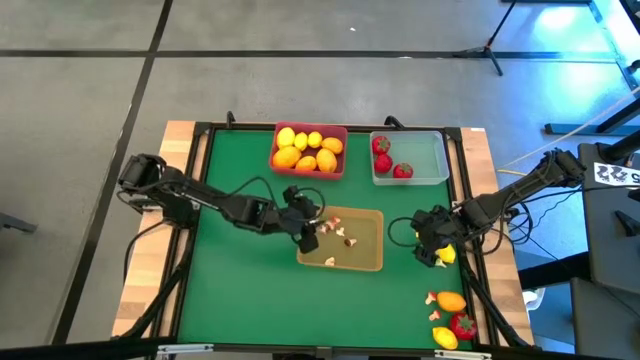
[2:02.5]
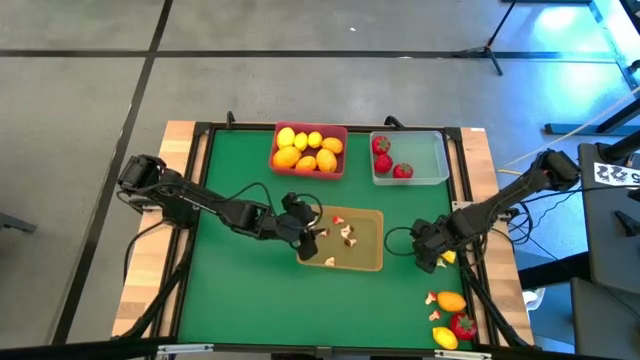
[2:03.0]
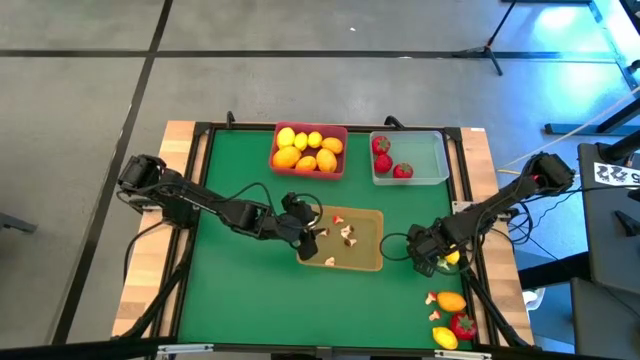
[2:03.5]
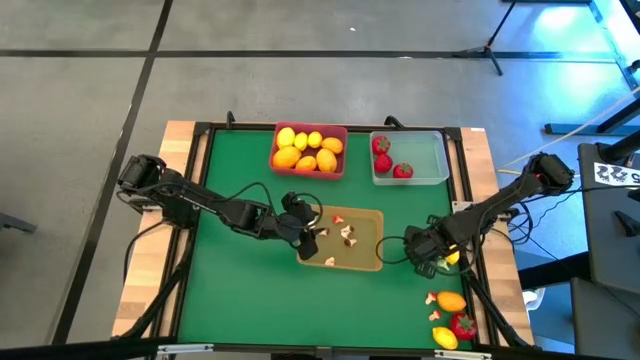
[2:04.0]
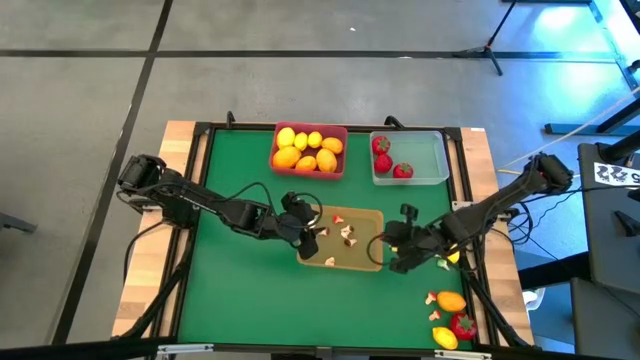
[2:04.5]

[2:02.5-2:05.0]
Task: Sort produce into baskets
Put the red mushroom into the orange bin

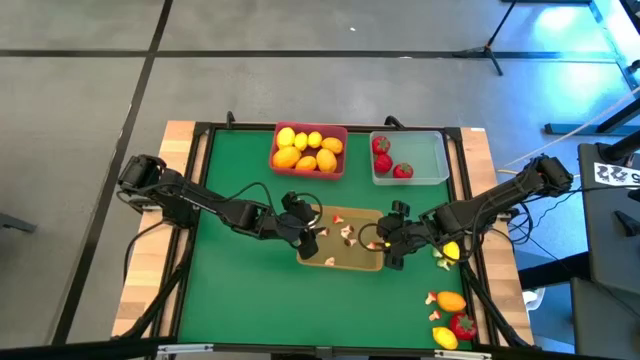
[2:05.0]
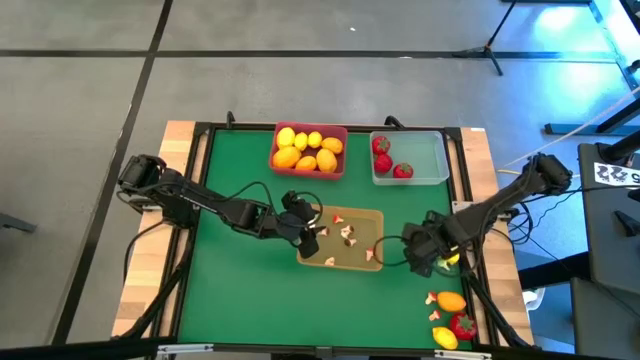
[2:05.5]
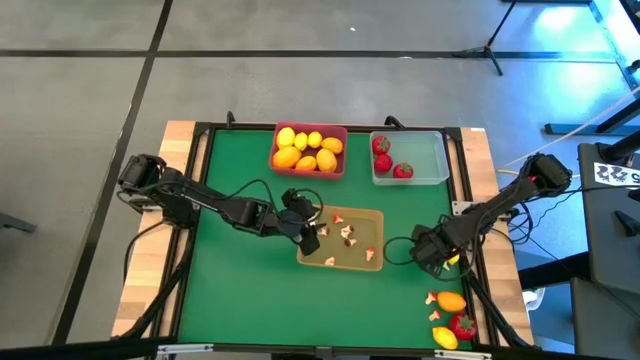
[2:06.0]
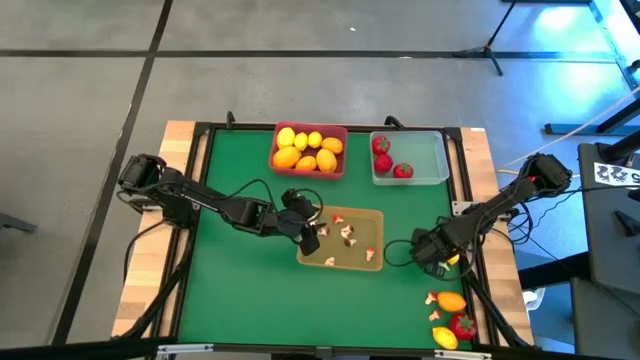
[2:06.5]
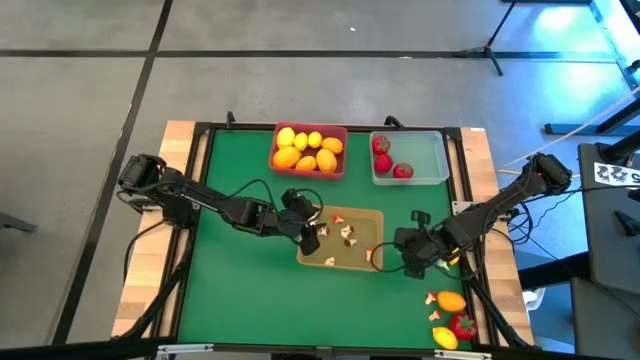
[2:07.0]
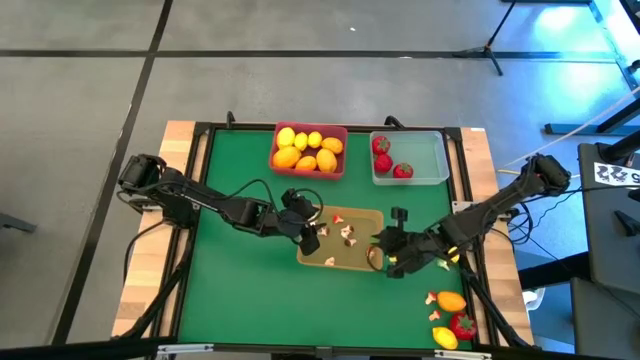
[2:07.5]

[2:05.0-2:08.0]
Put the green mushroom into the orange bin

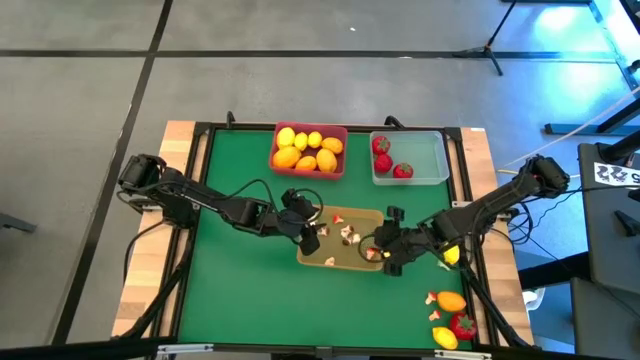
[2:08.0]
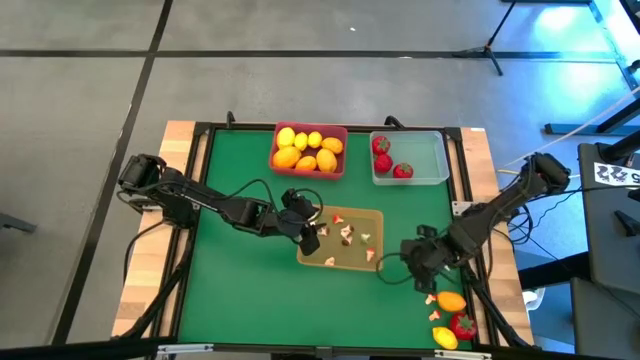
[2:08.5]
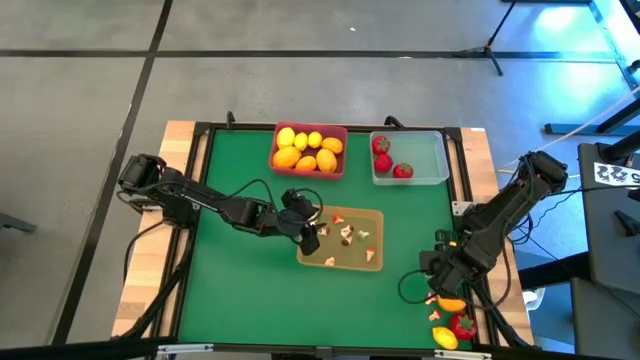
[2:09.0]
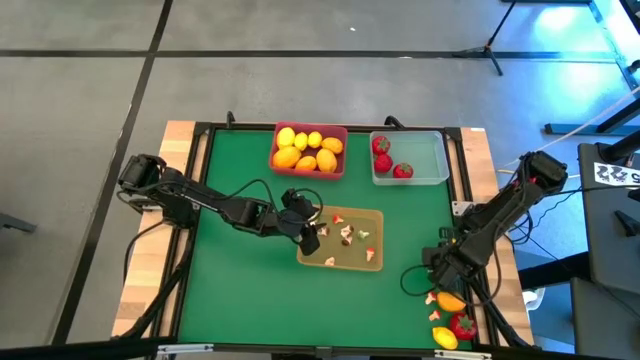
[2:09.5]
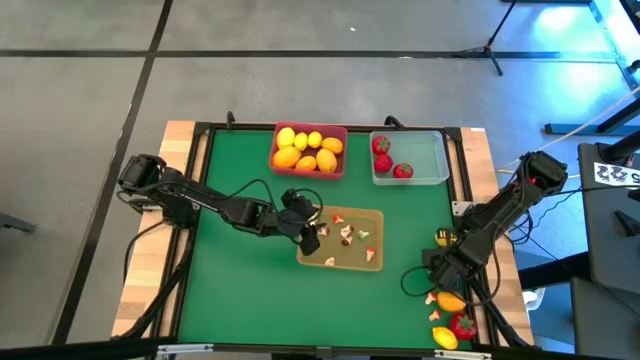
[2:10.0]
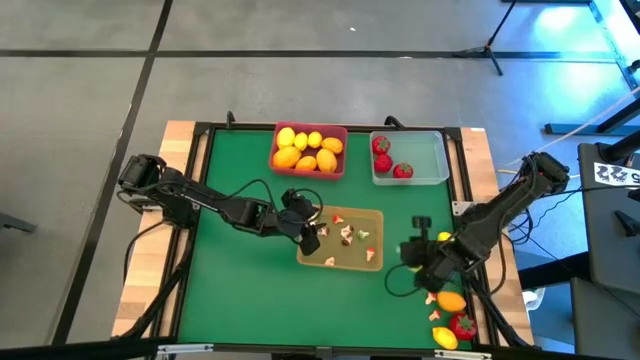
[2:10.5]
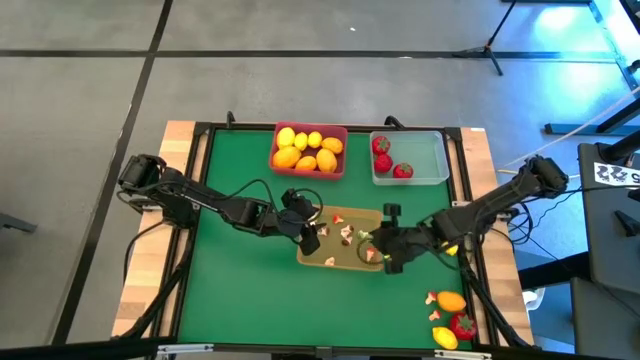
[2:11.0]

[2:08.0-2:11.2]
Put the green mushroom into the orange bin

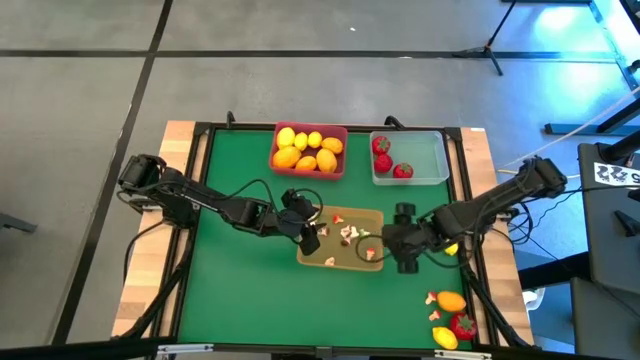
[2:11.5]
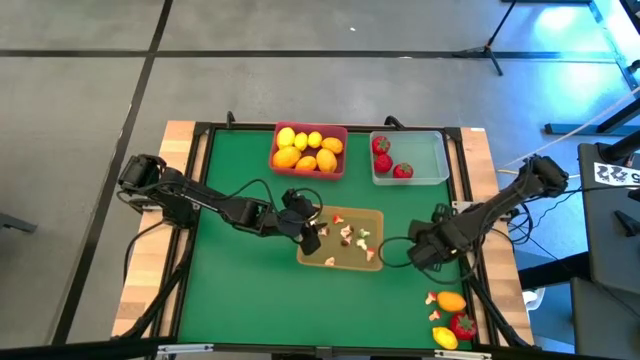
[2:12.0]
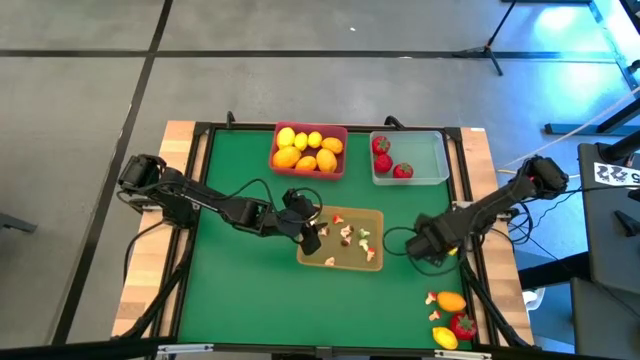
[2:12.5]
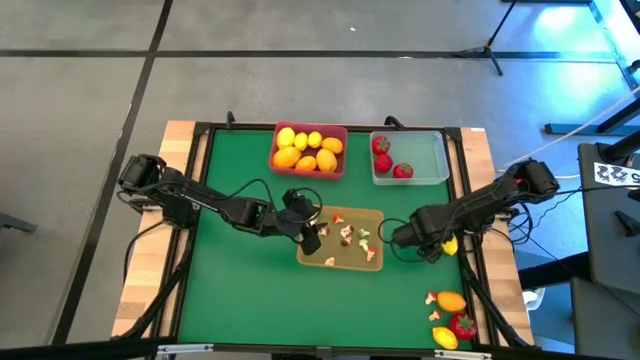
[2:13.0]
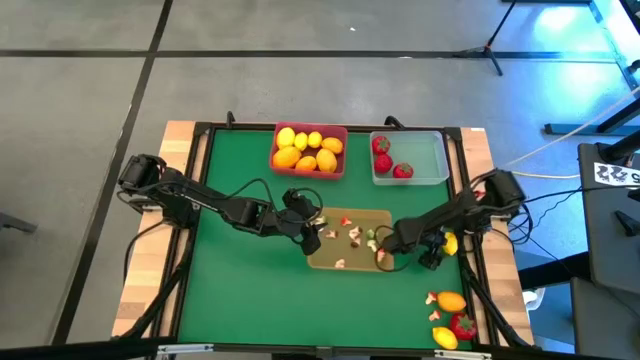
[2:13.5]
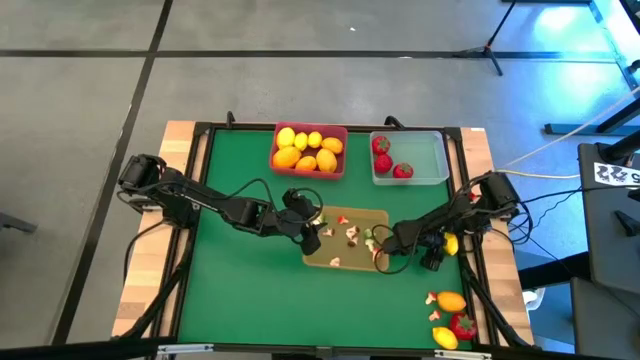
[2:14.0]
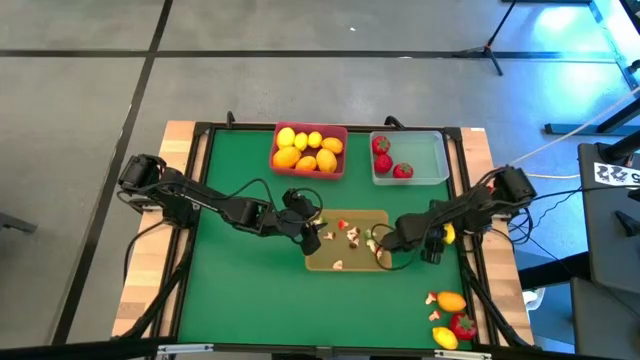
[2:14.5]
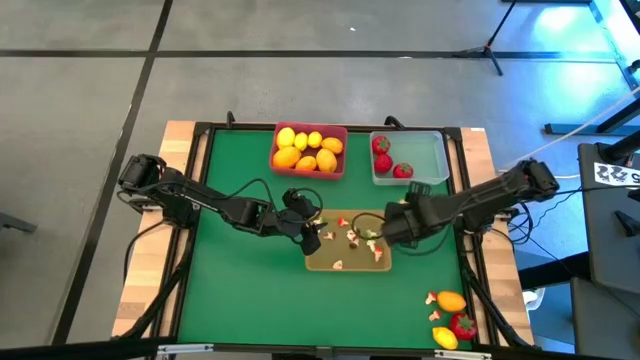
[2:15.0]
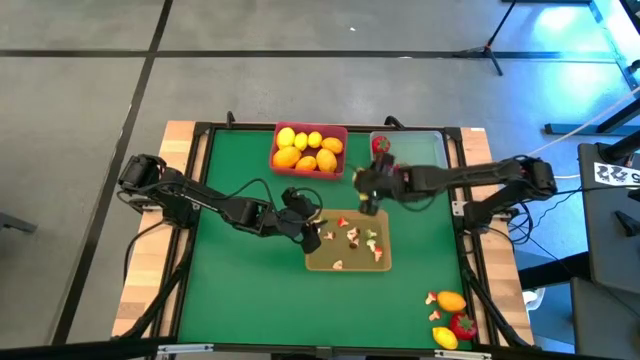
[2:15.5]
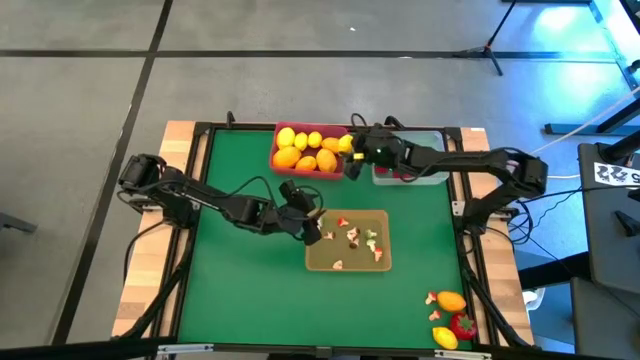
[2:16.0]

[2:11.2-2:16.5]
Put the yellow lemon into the red bin

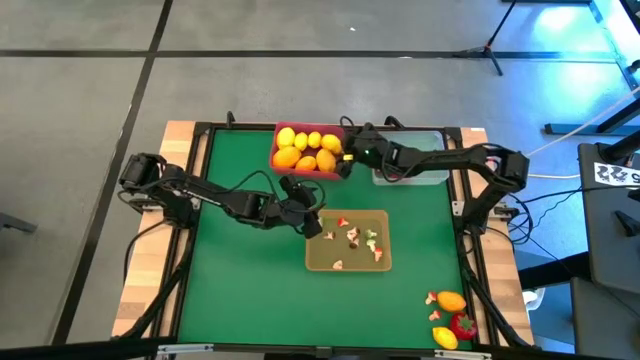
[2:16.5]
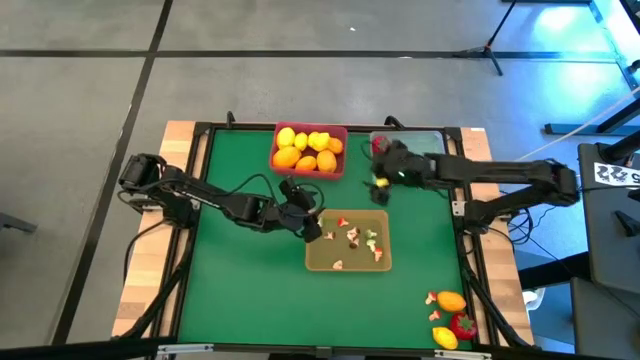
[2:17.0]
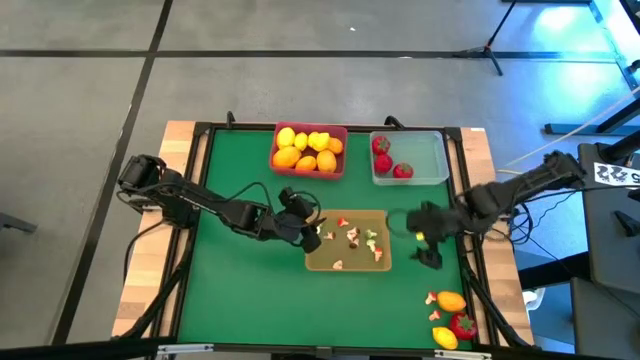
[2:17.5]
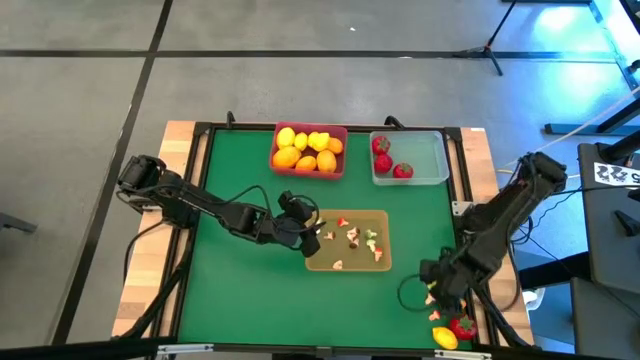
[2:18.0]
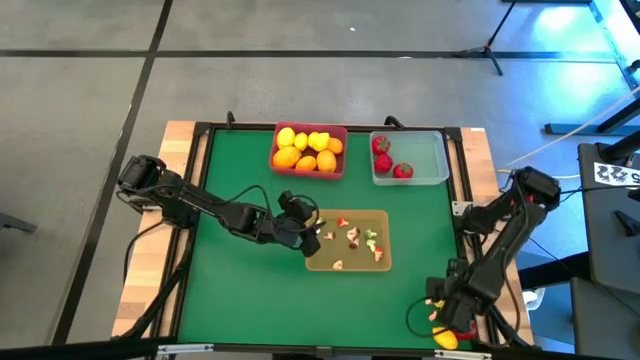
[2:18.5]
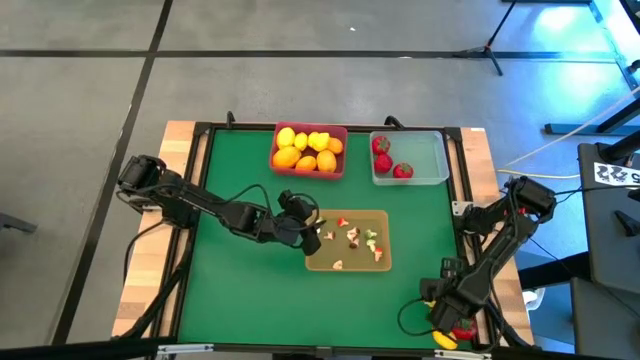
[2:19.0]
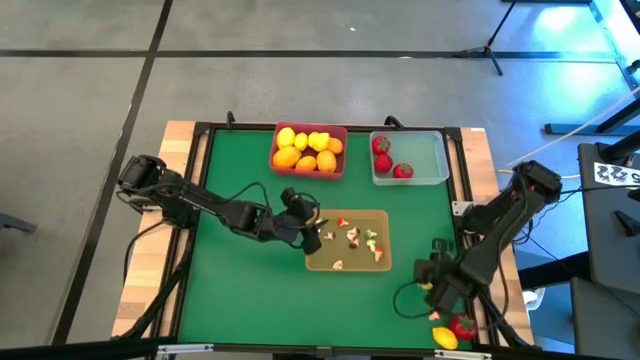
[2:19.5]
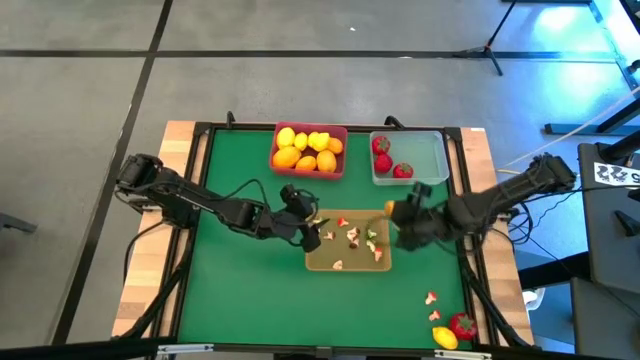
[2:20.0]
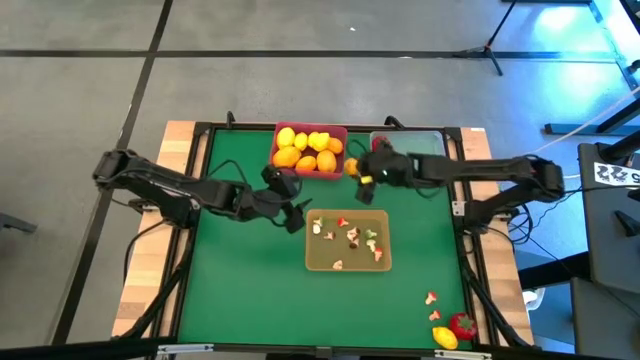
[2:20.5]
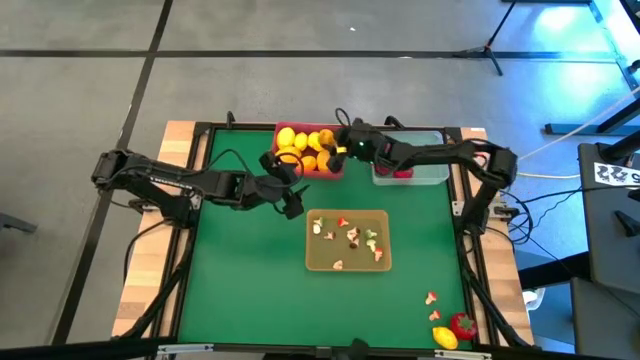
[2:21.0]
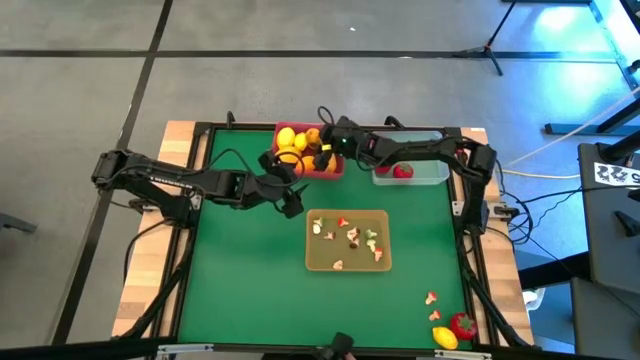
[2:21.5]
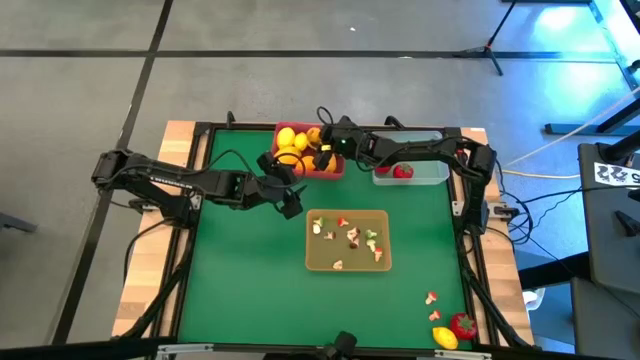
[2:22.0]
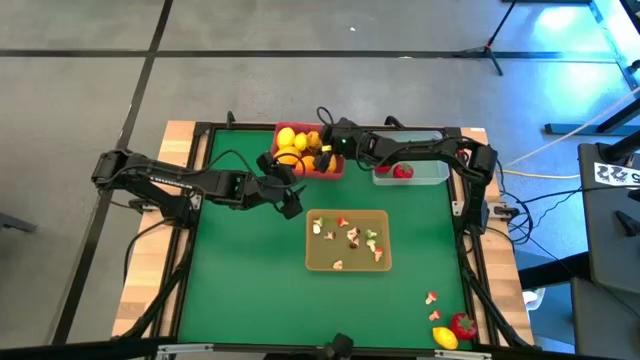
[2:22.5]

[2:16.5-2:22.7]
Put the yellow lemon into the red bin

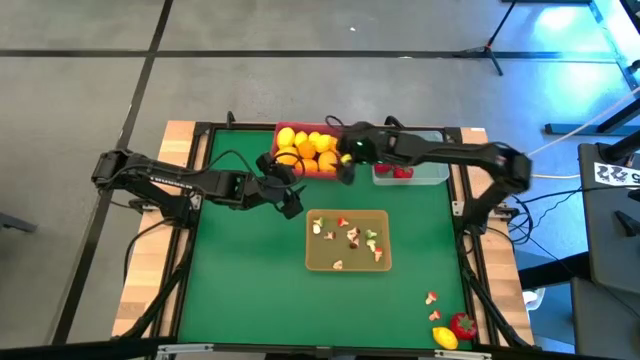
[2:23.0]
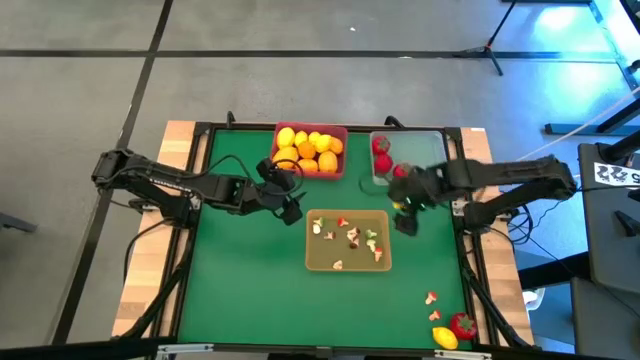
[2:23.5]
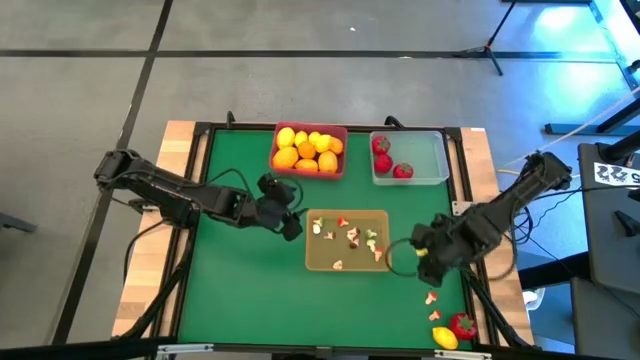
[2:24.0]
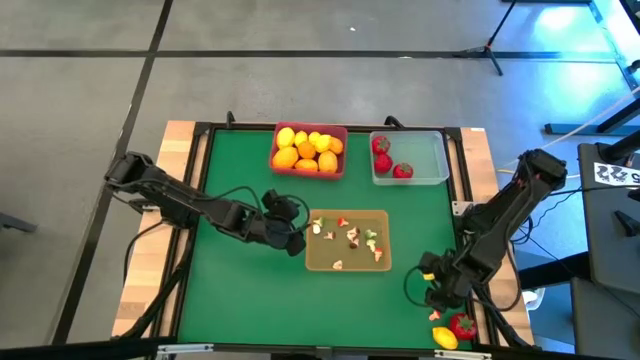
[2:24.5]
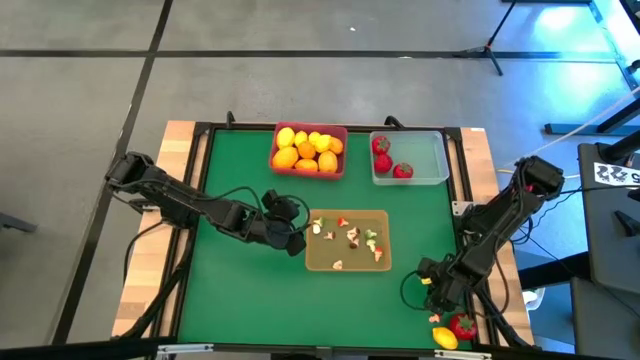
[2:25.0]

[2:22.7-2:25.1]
Put the red mushroom into the orange bin
